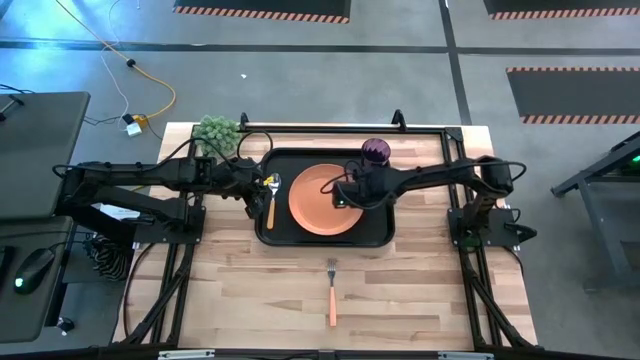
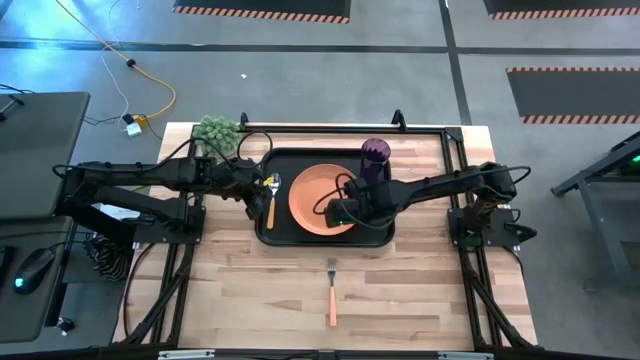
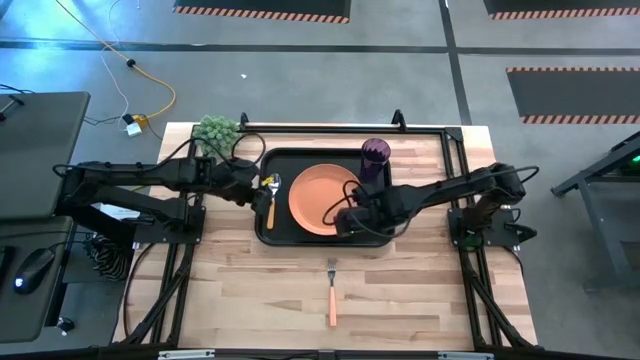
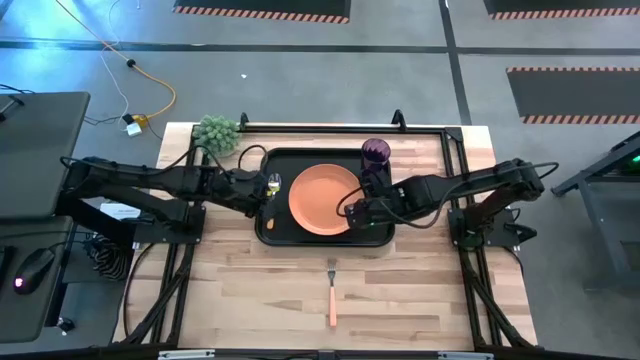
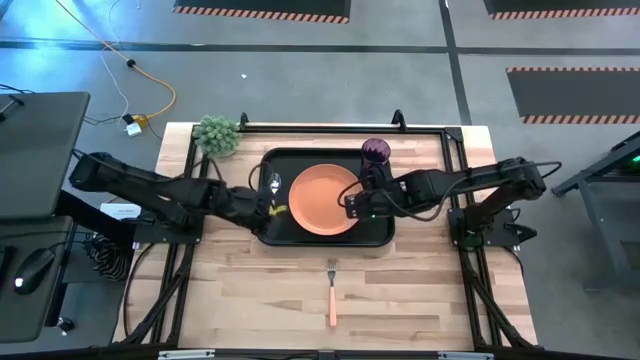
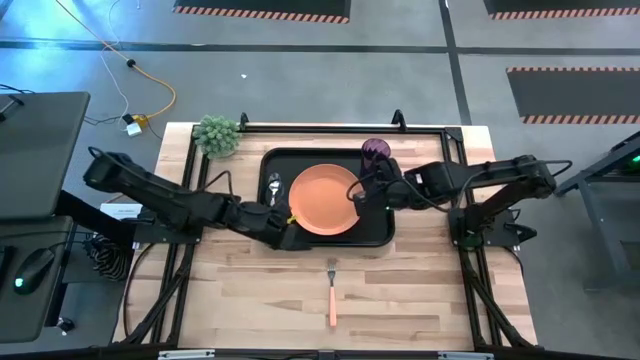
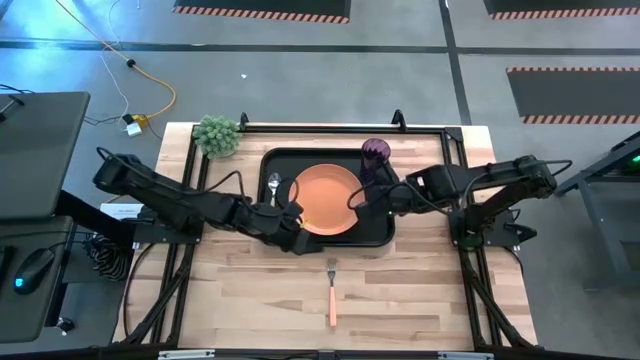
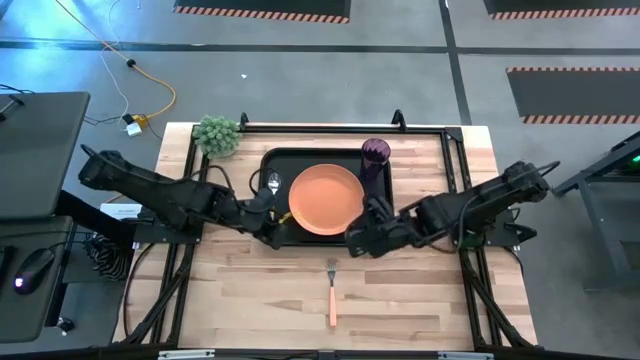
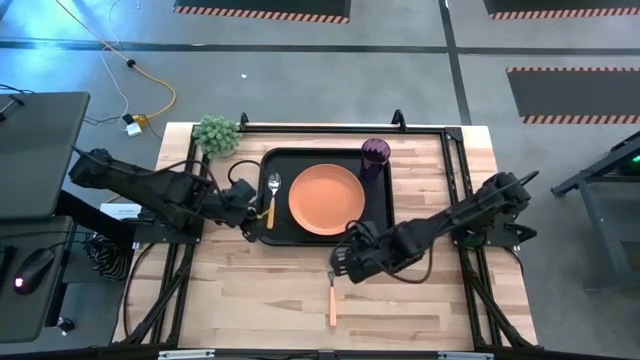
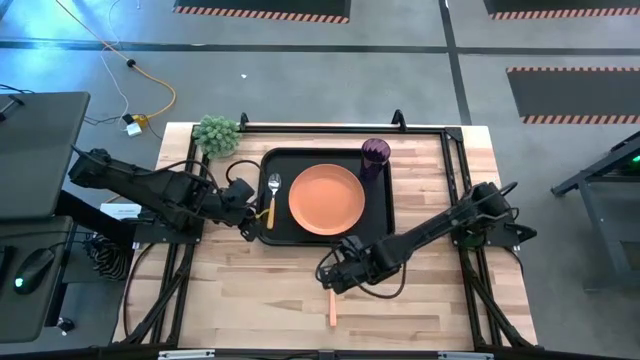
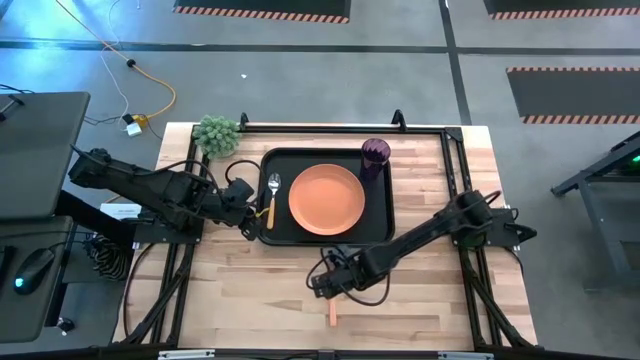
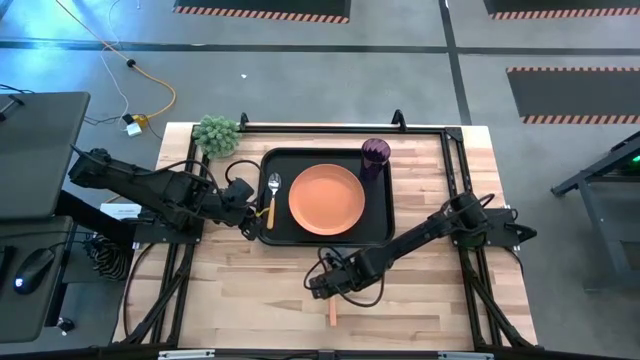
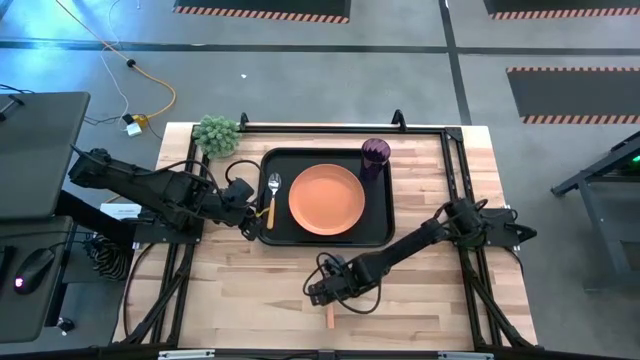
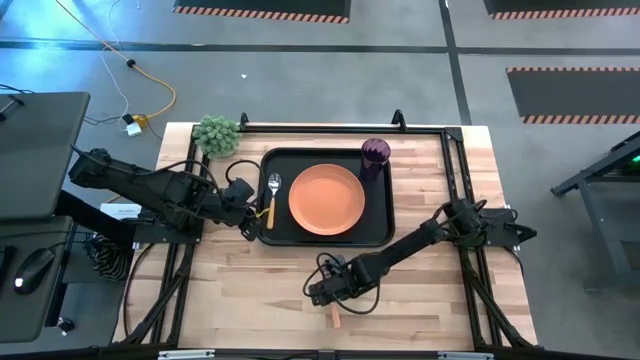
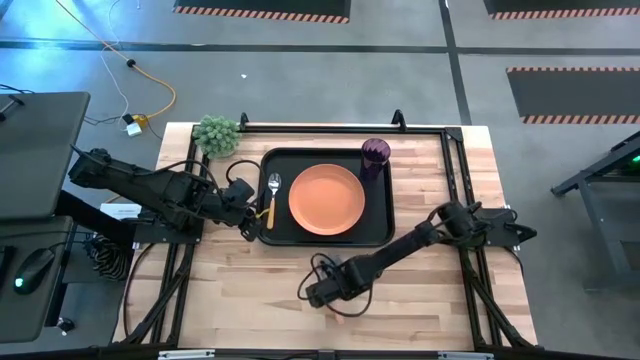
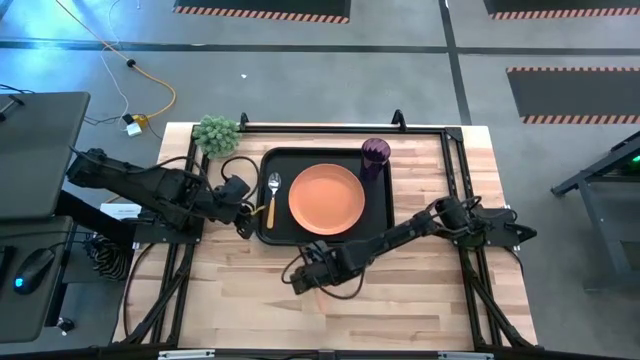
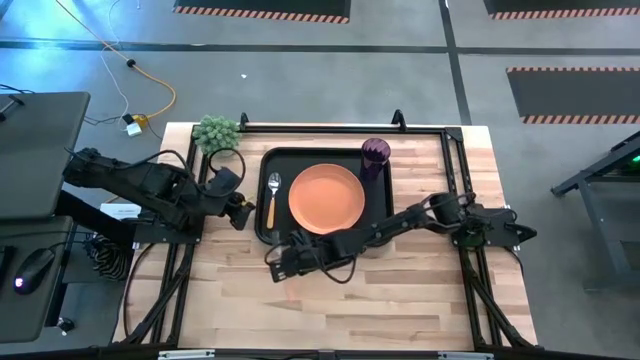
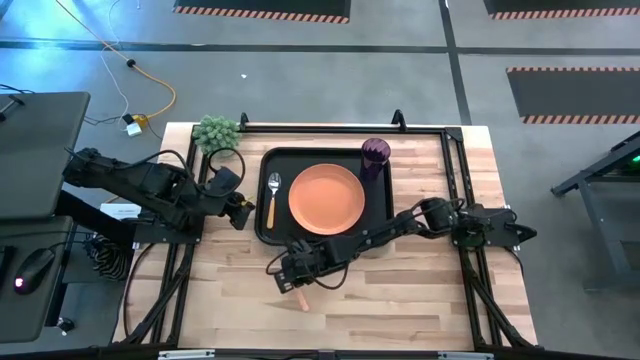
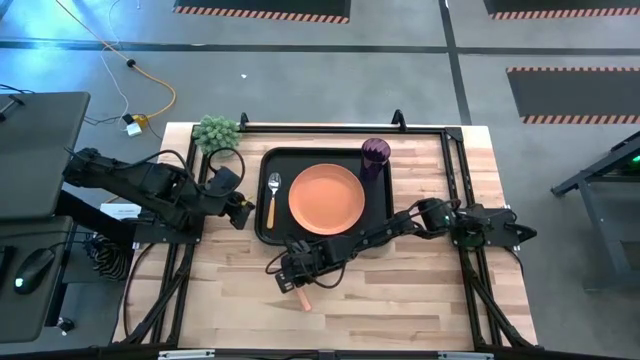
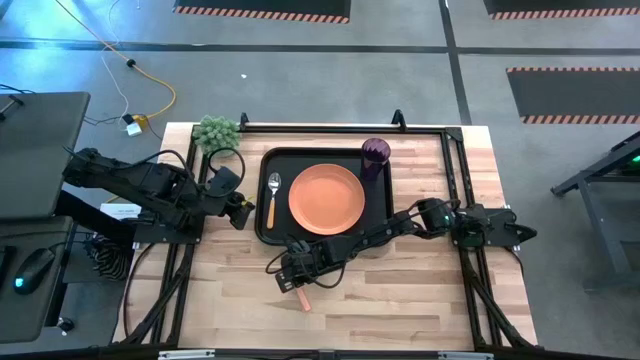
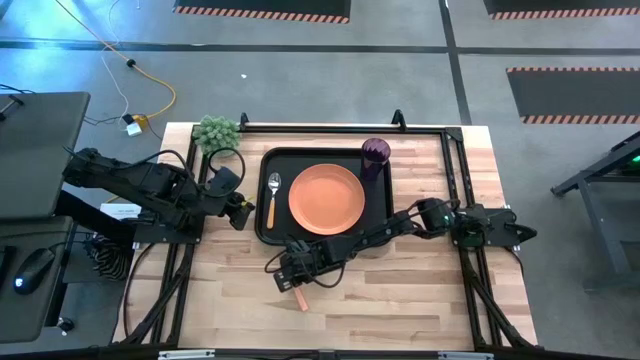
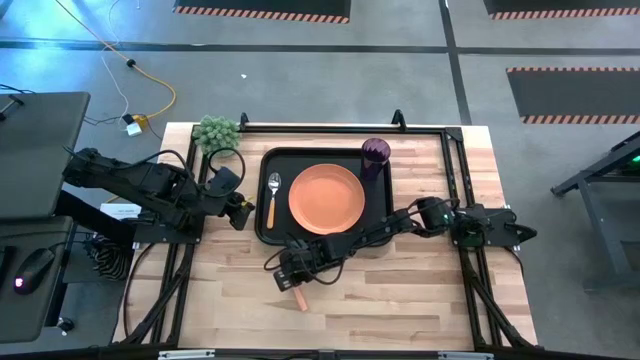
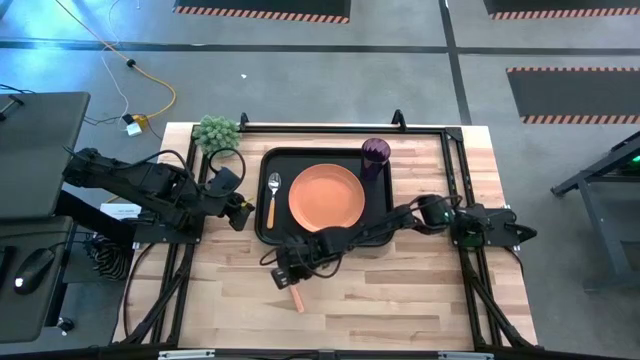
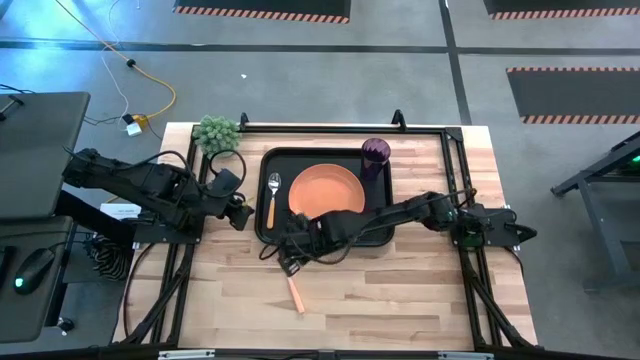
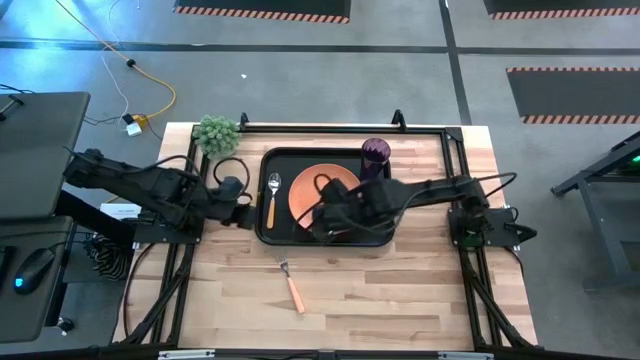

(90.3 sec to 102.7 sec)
Task: Pick and place plate/cup/fork/spoon on tray
Put the orange fork between the orange spoon and the orange plate on the black serving tray

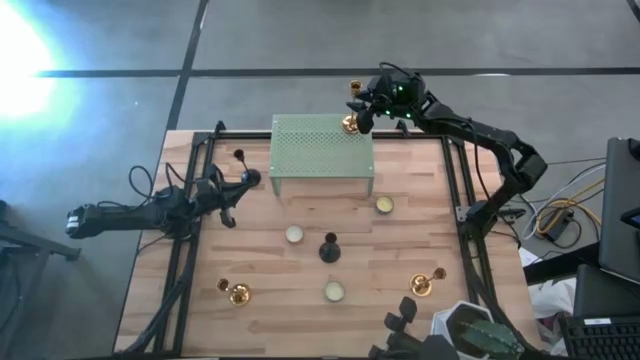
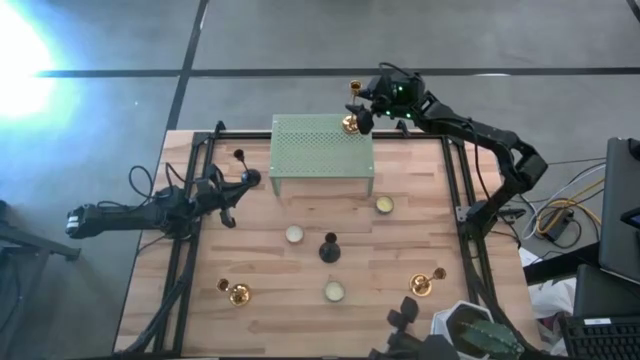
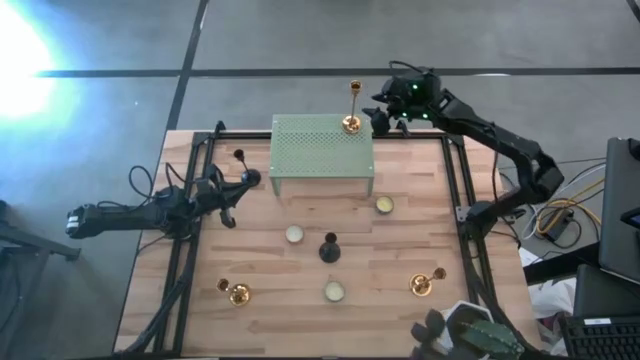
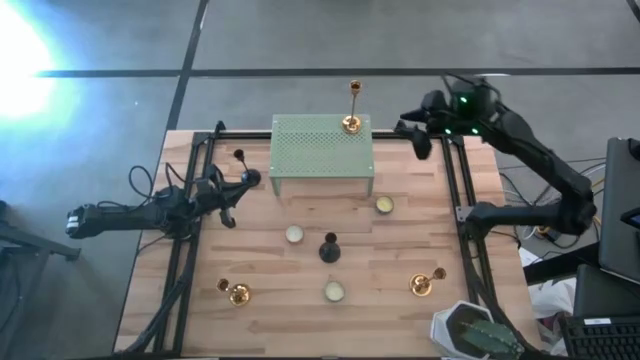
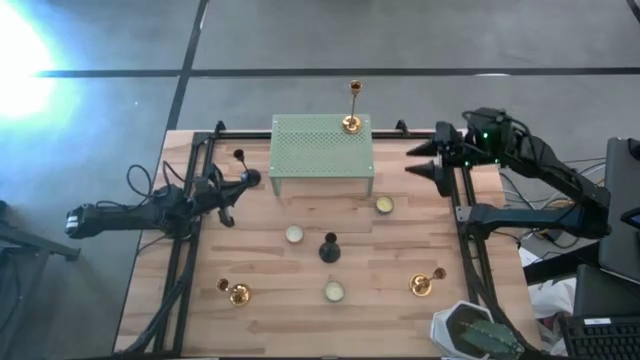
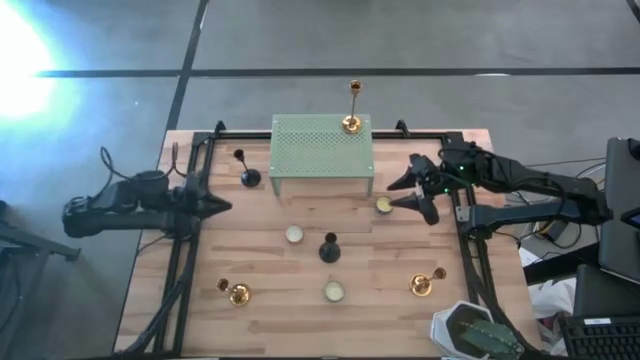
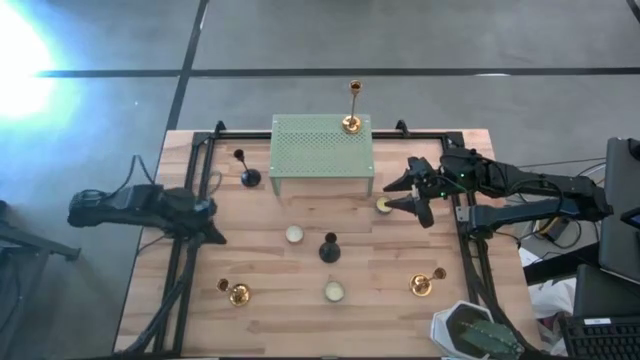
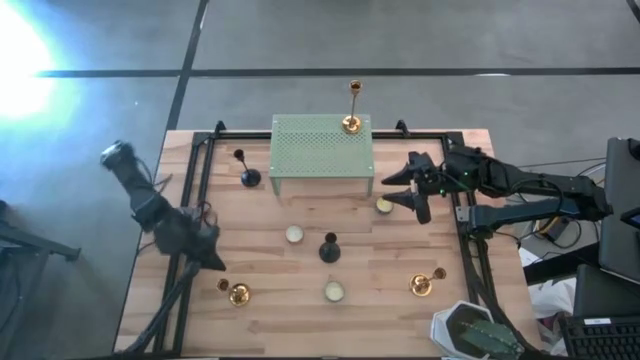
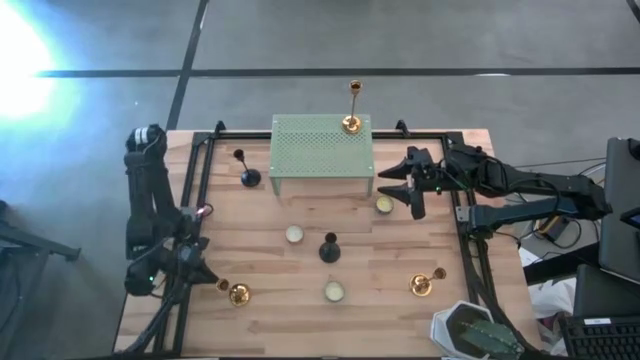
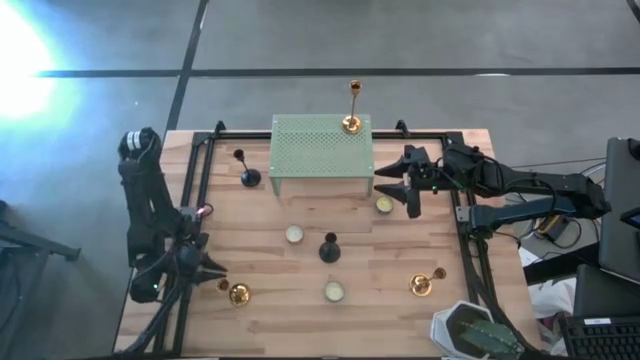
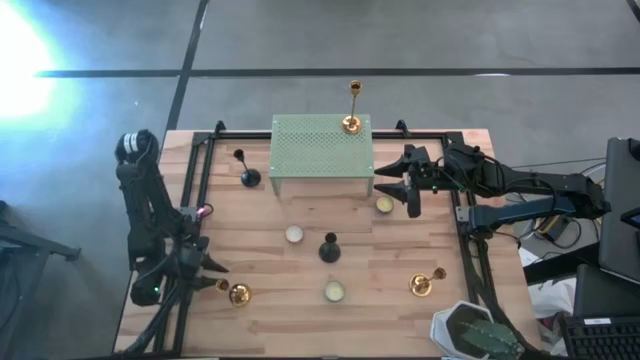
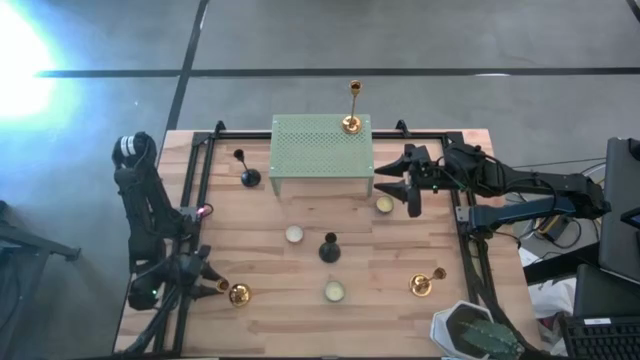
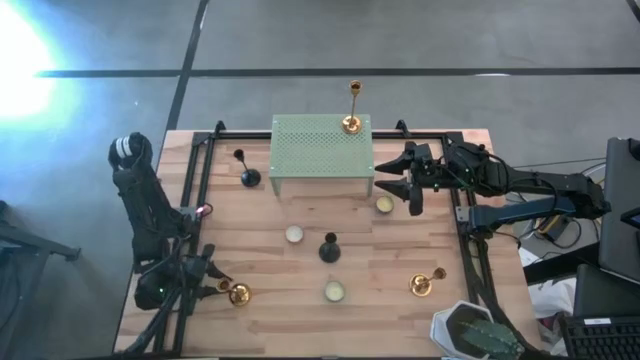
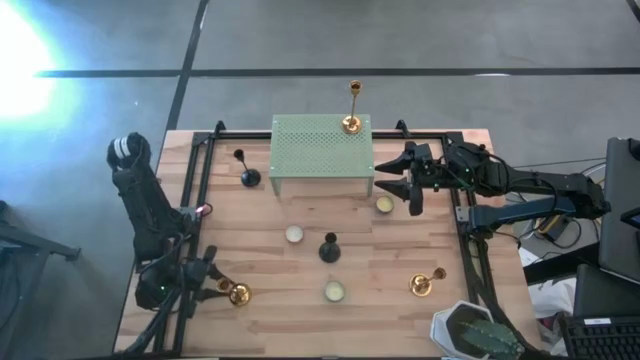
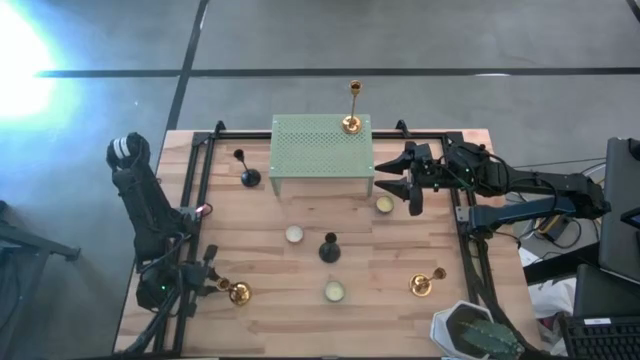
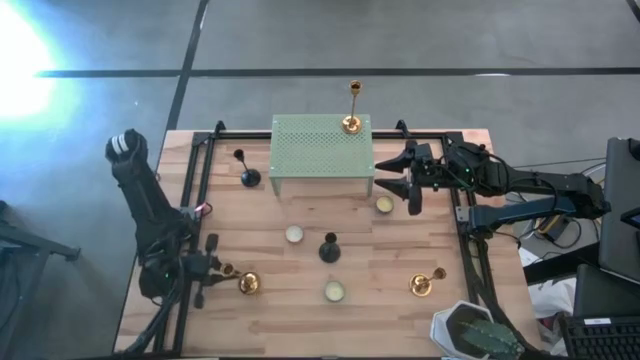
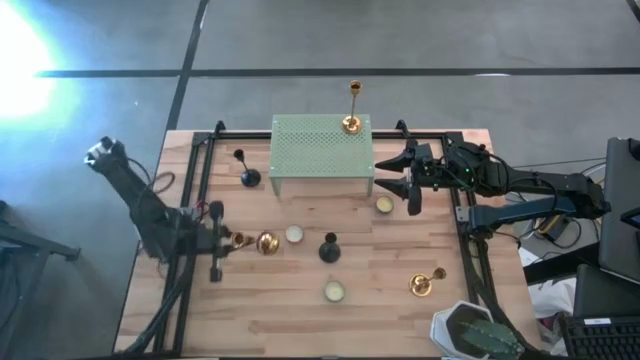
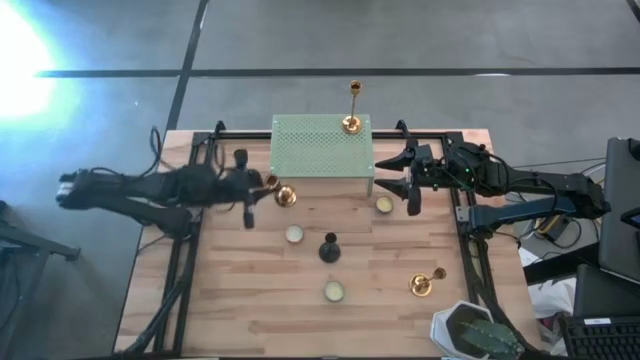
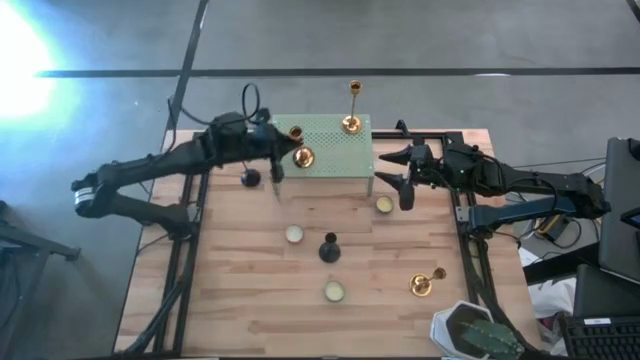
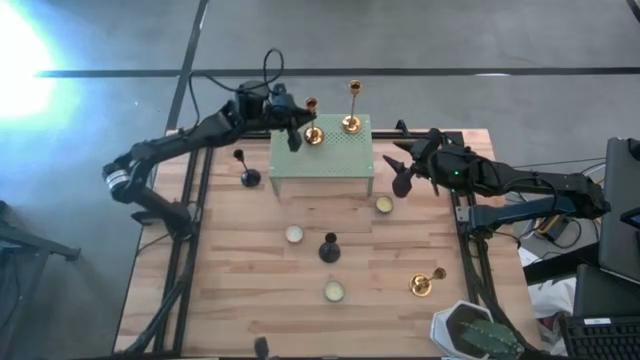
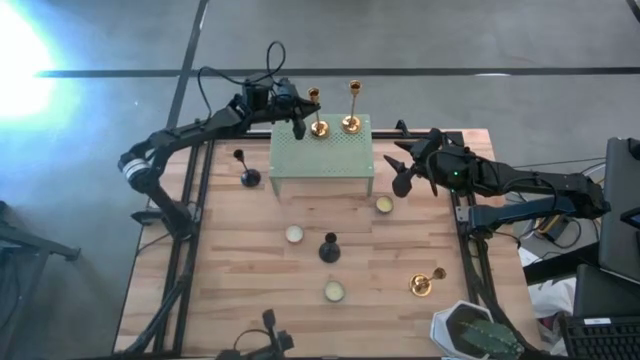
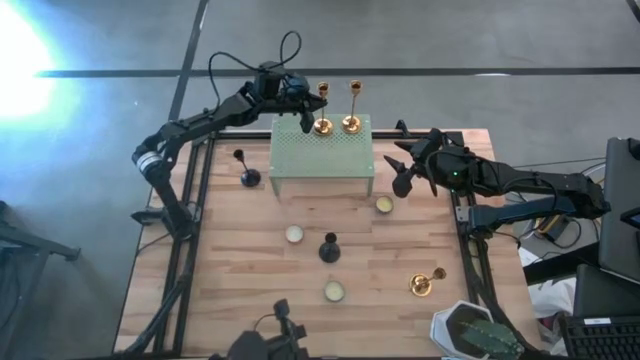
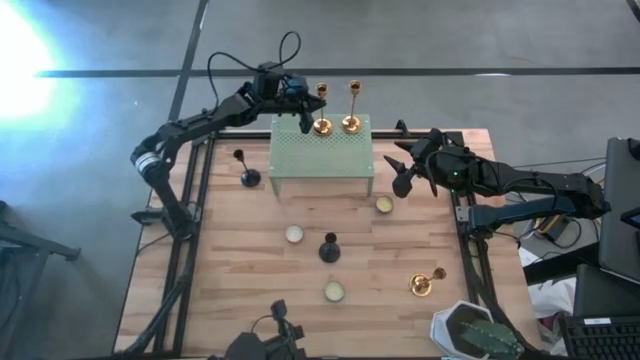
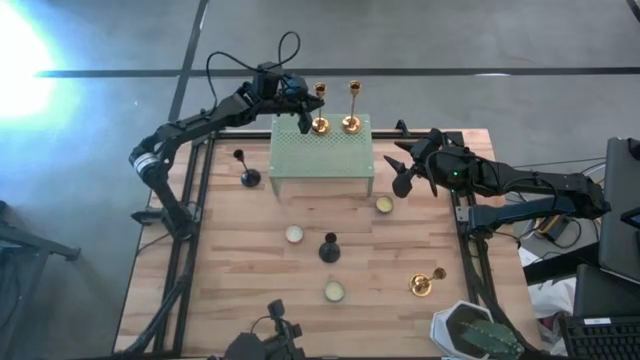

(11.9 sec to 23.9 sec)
Task: Pick & Place candle stick holders
Align the left gold candle holder with the other gold candle holder on the shelf
